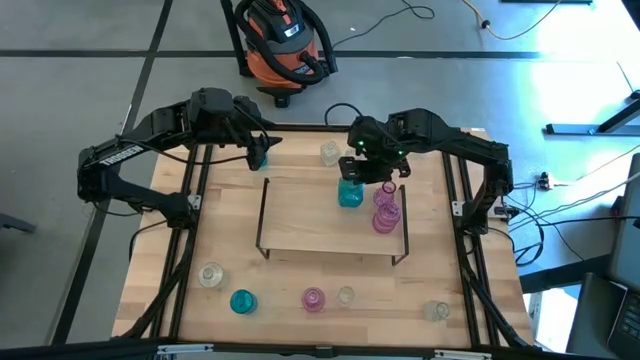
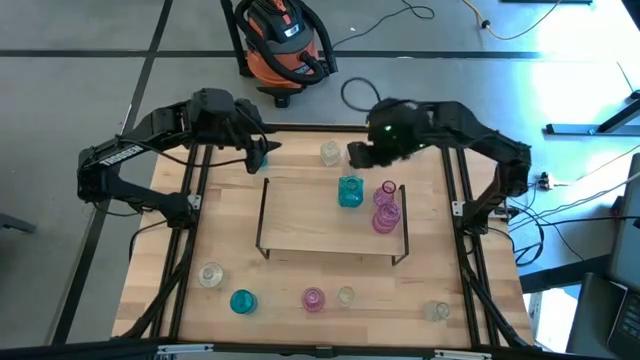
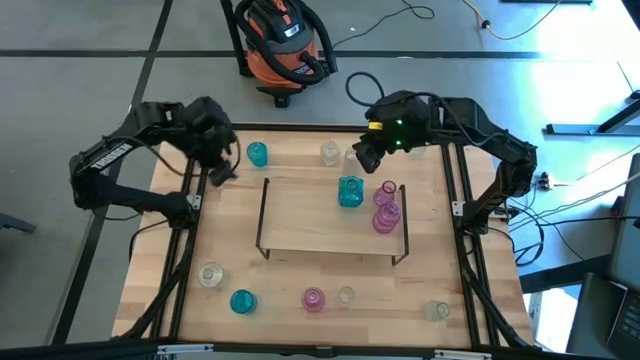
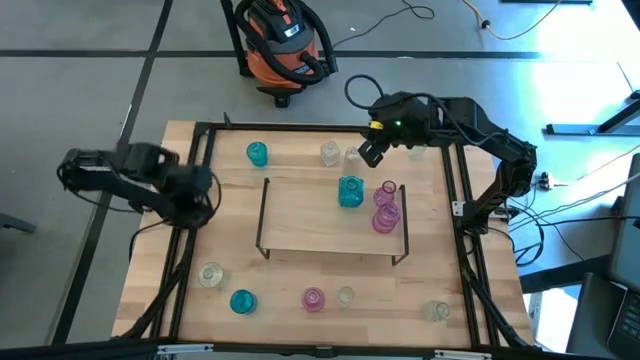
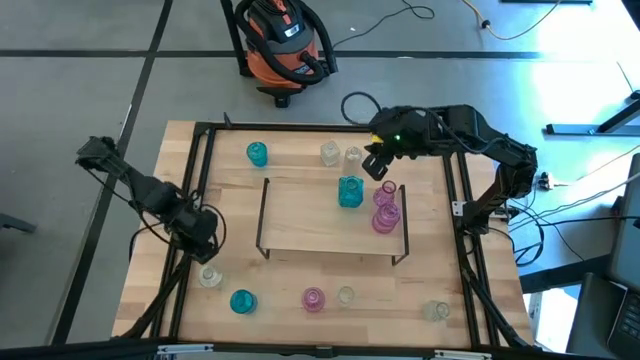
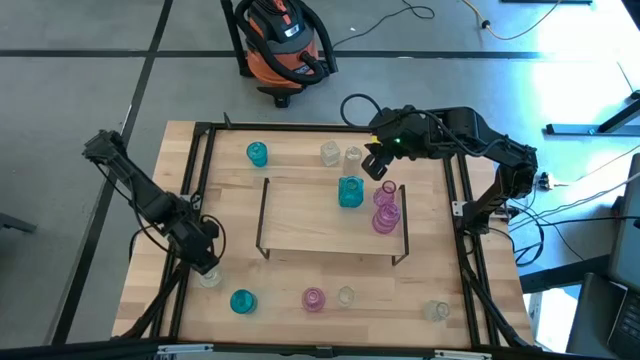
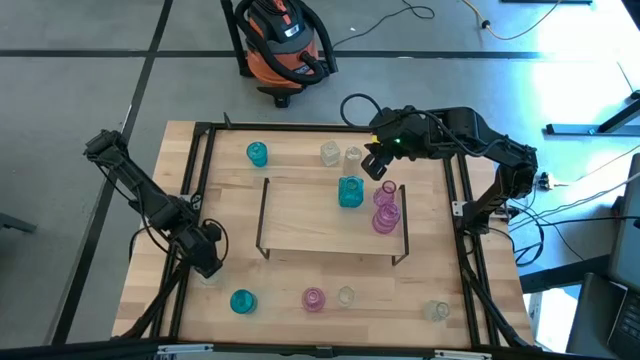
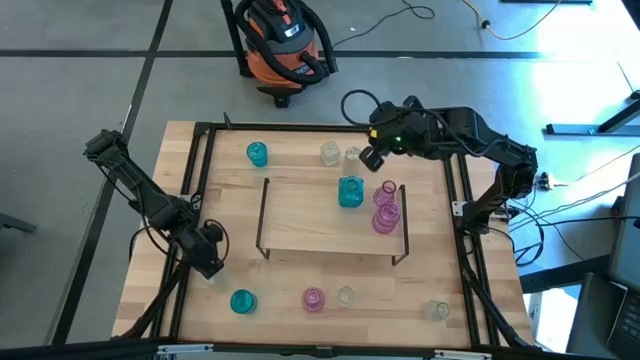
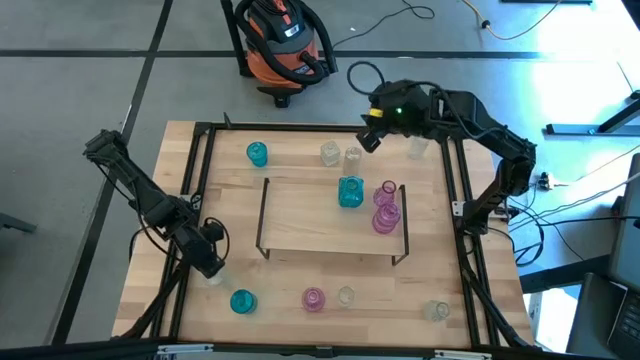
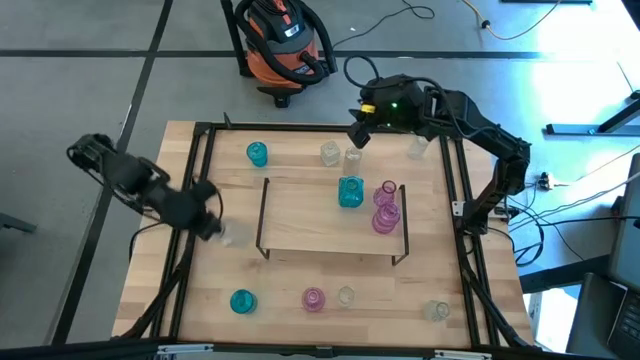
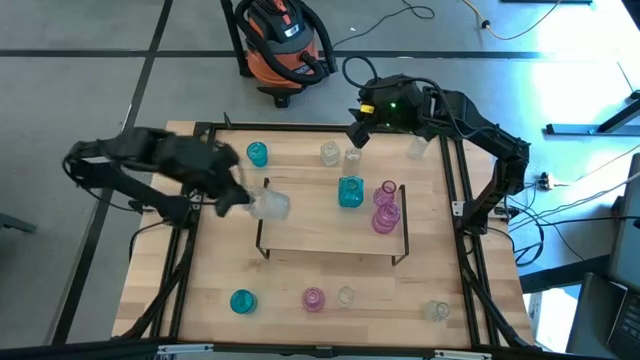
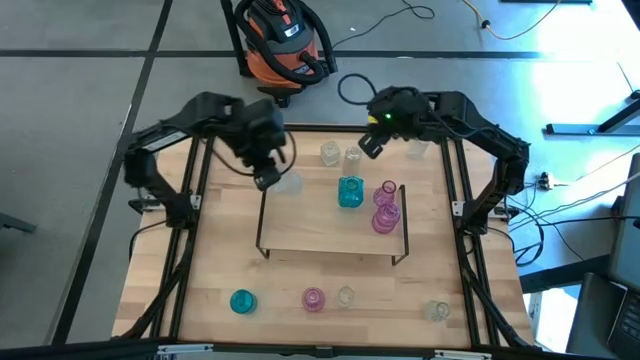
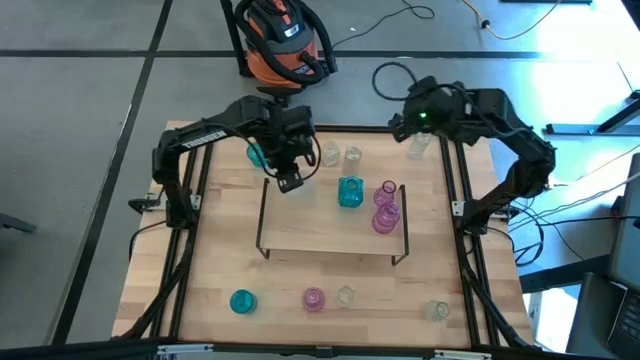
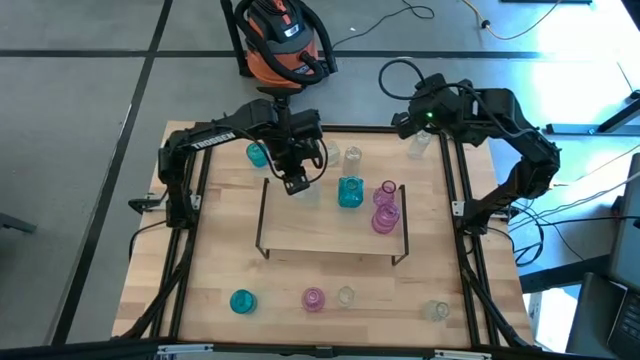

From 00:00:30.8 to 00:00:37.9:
Task: sort vases onto shelf
Put the bottom left transparent vase on the shelf

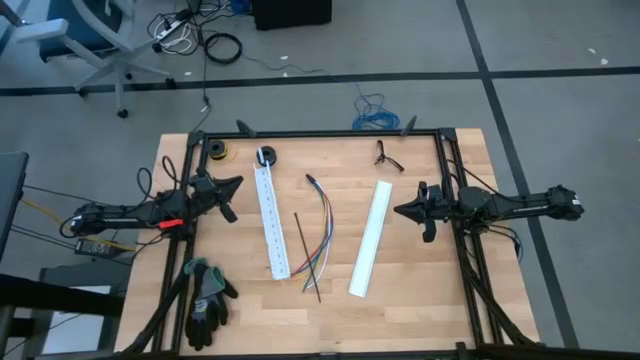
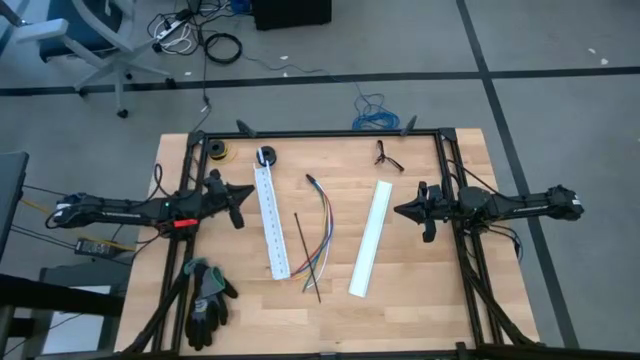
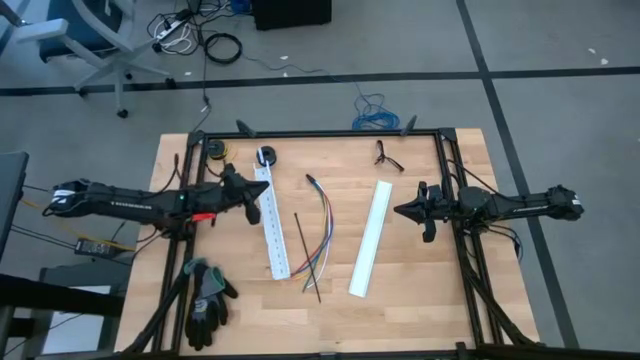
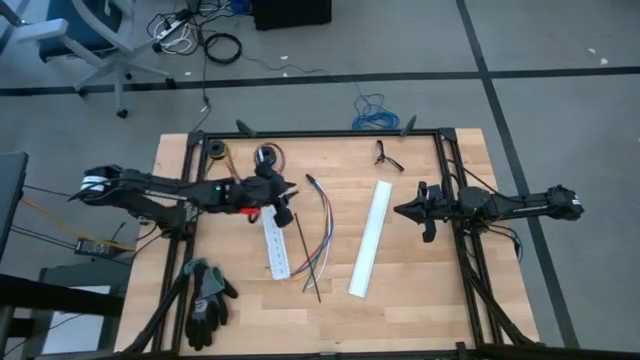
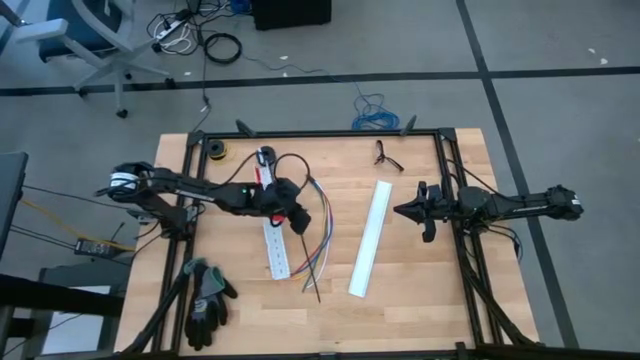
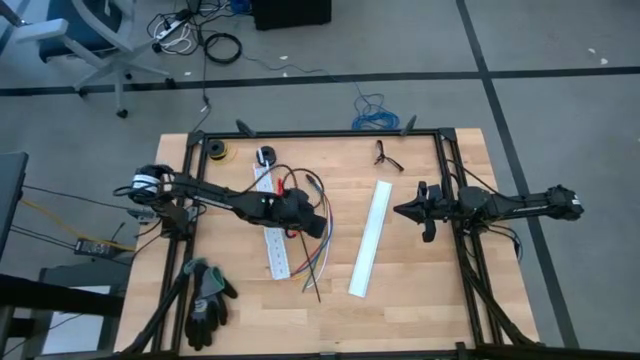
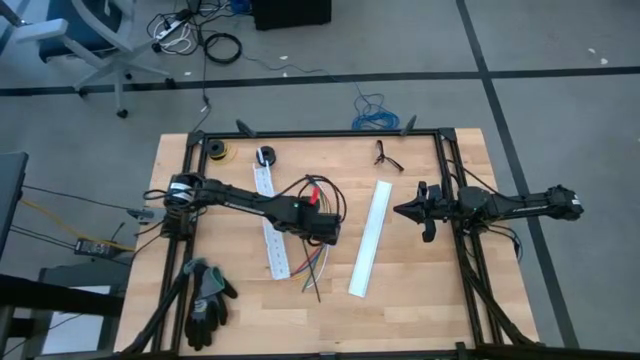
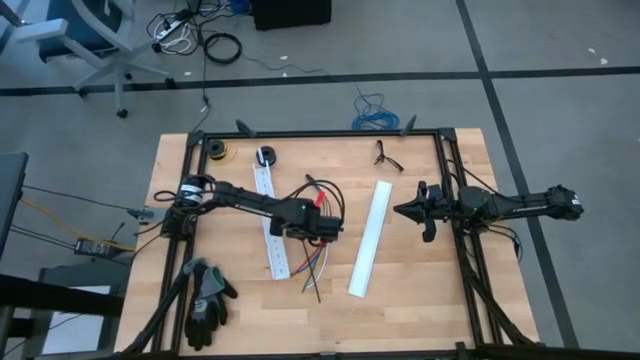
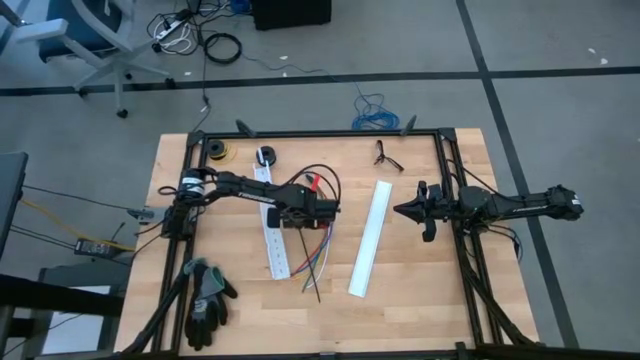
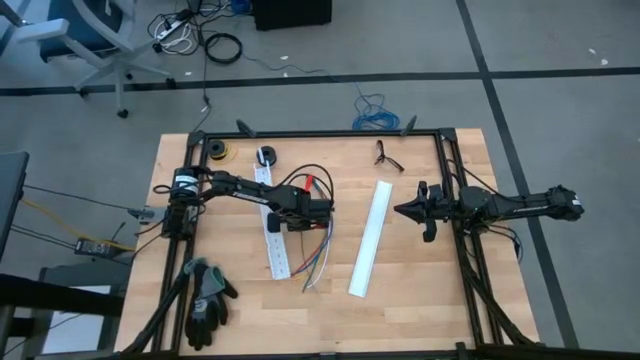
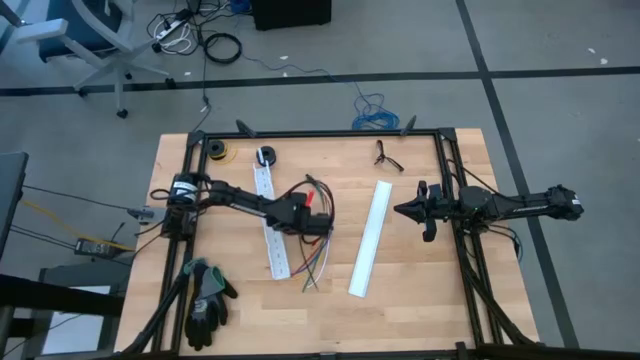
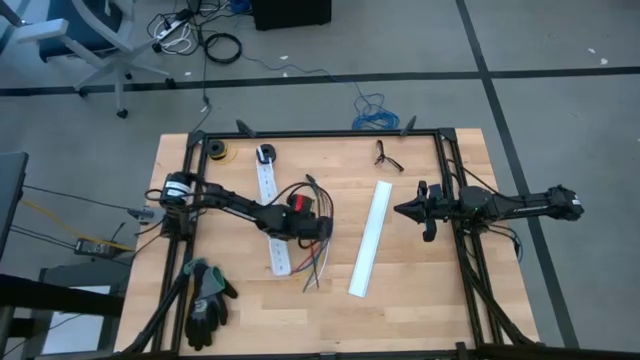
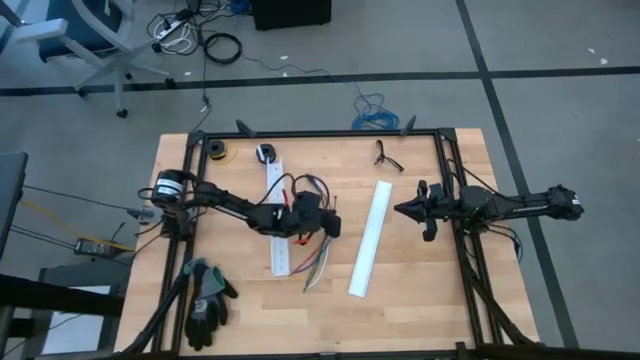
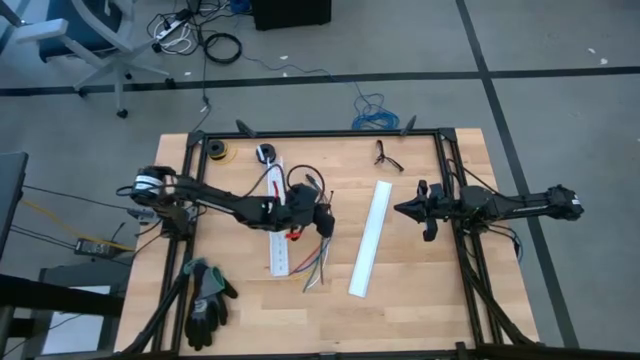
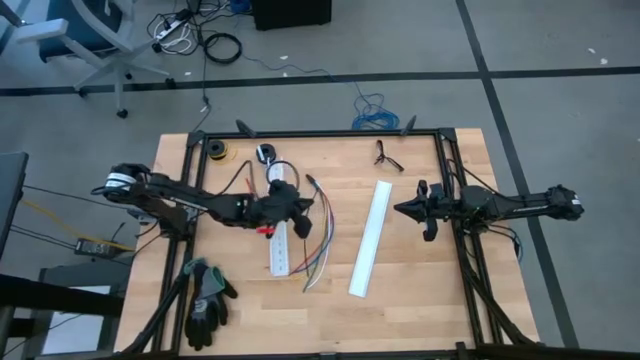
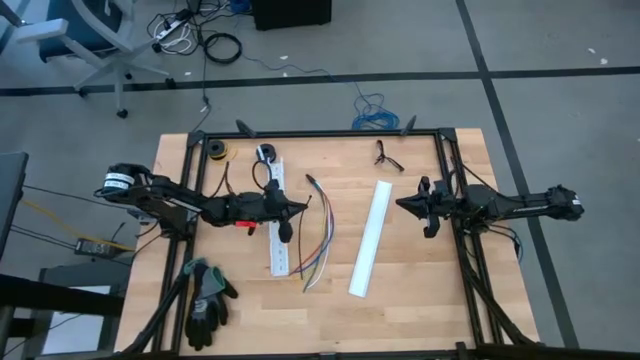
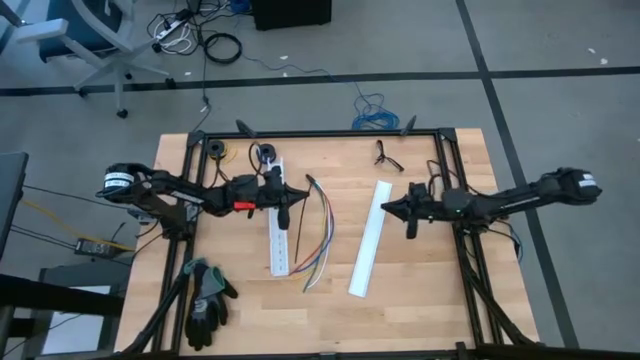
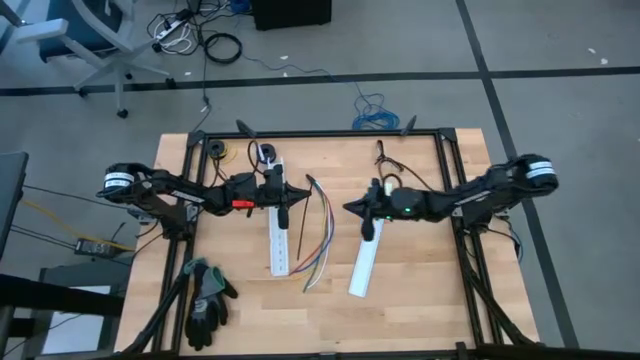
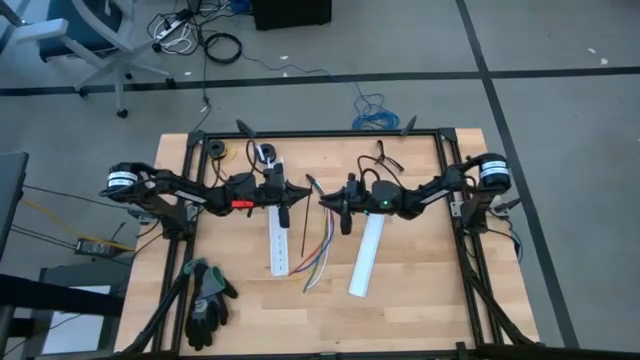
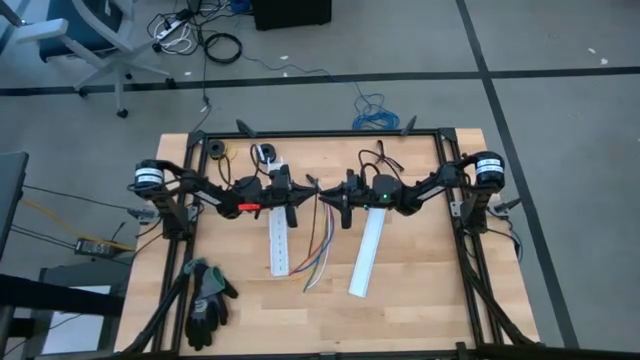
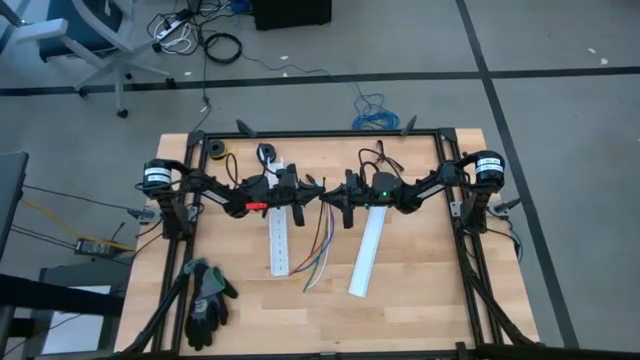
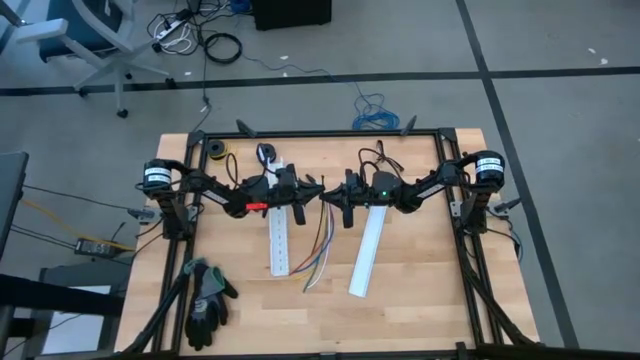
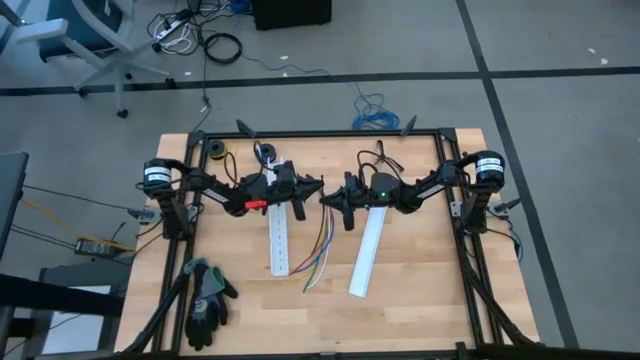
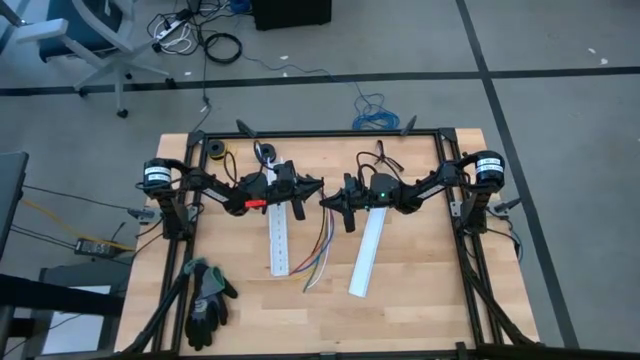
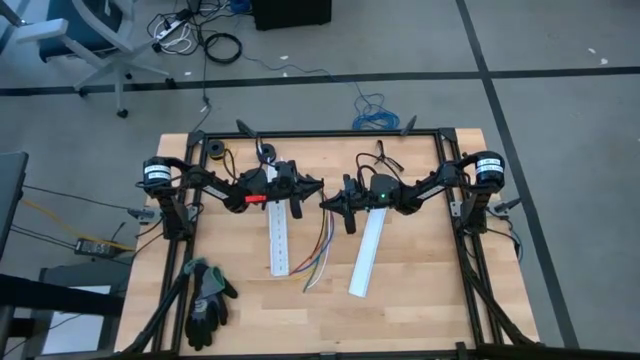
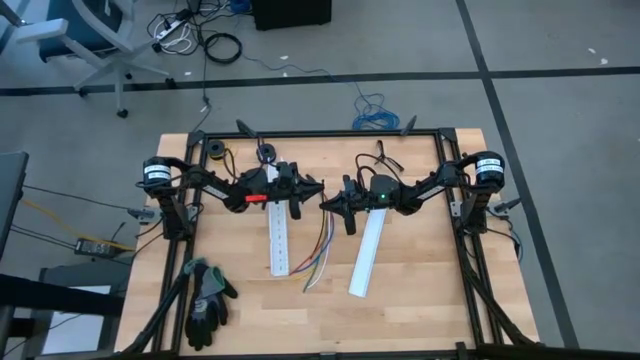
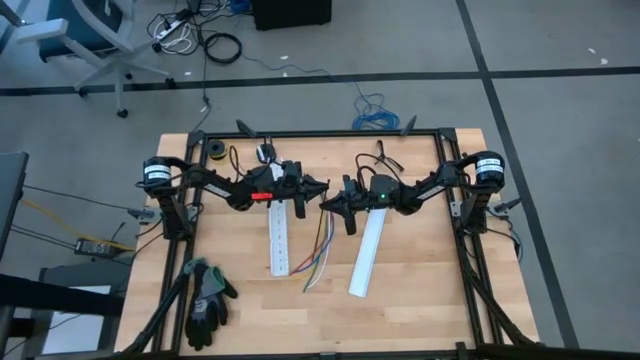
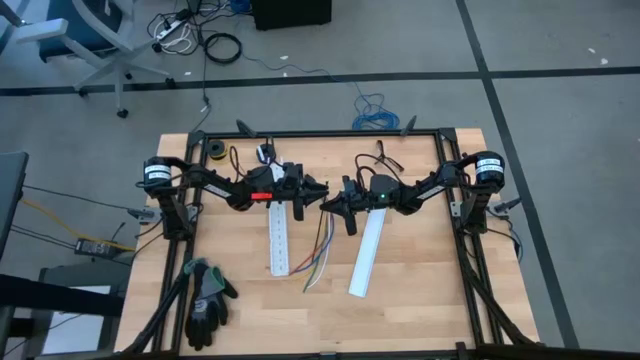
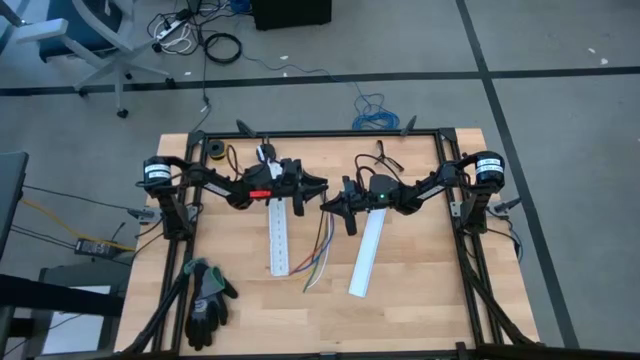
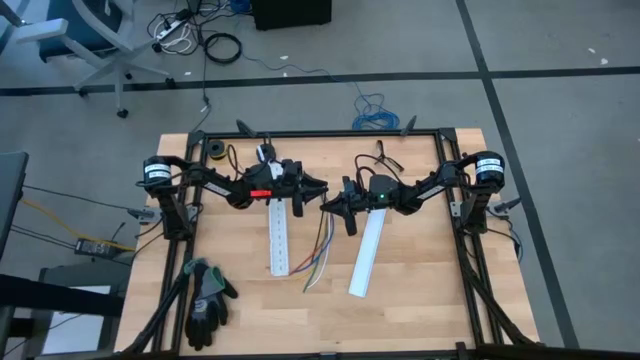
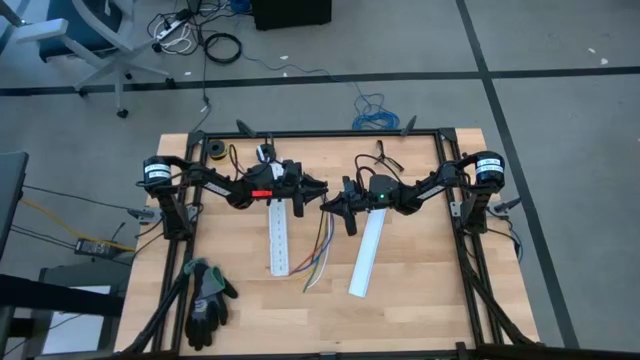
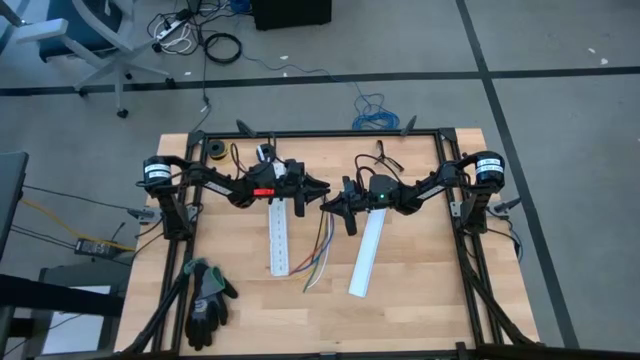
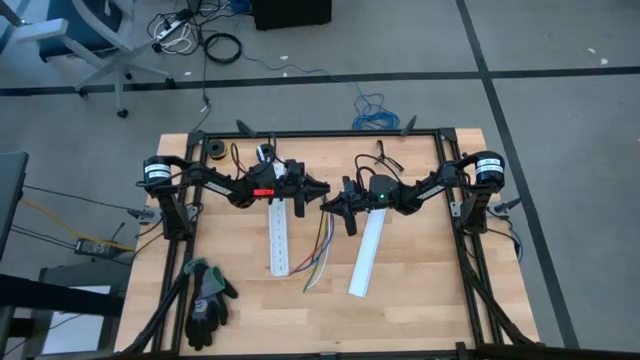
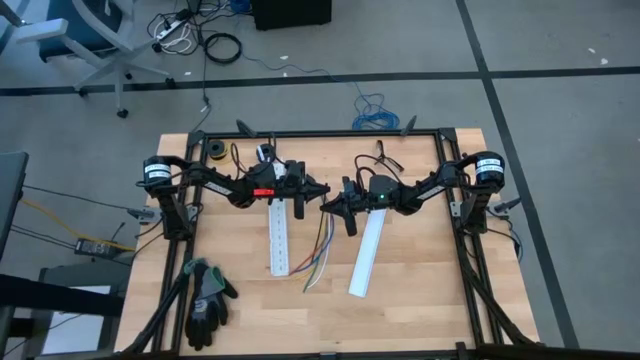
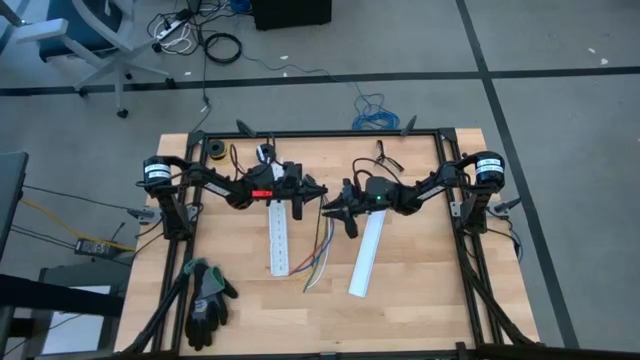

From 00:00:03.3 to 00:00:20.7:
Task: Ziptie cables
Wrap the zip tie into the cable wires
